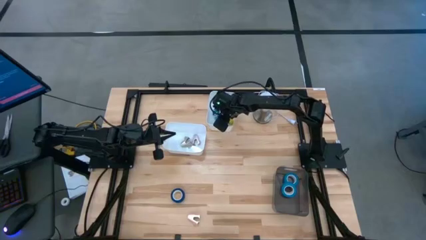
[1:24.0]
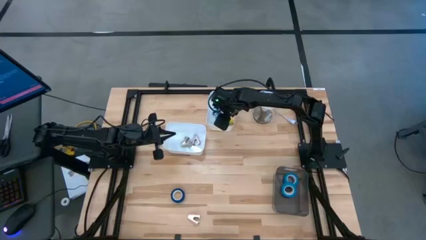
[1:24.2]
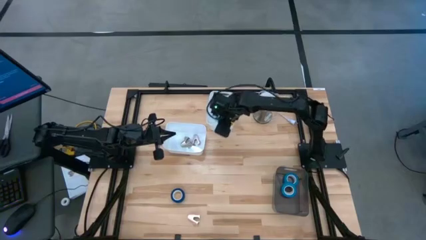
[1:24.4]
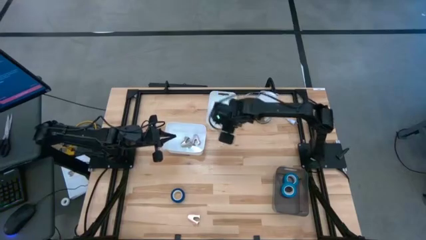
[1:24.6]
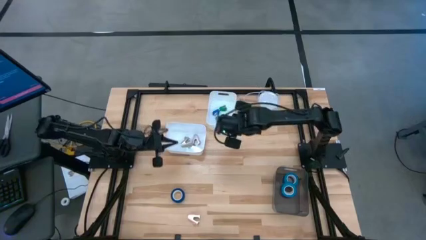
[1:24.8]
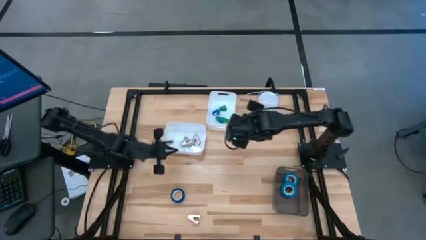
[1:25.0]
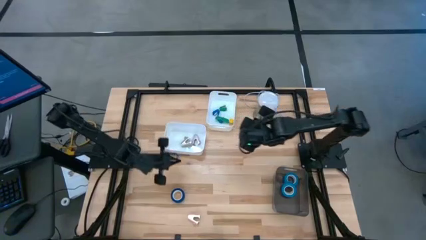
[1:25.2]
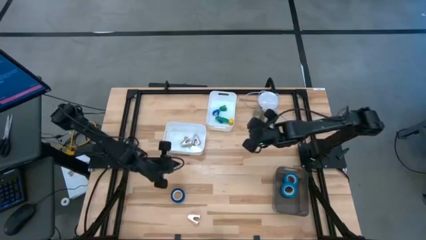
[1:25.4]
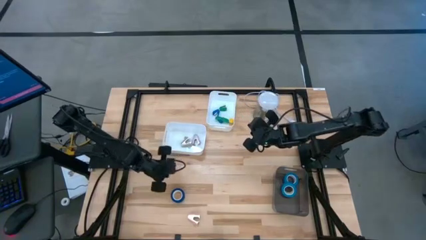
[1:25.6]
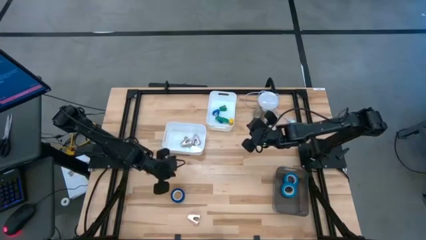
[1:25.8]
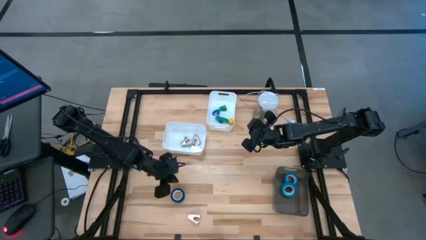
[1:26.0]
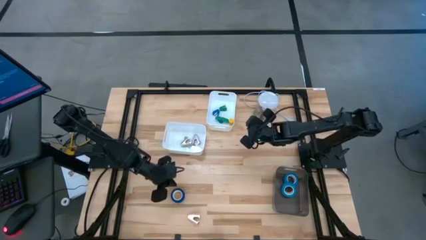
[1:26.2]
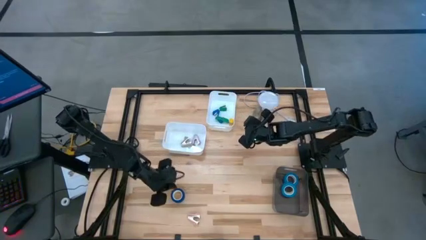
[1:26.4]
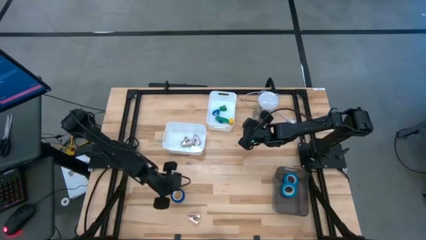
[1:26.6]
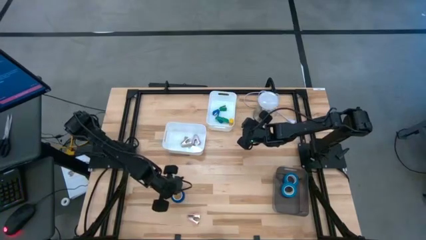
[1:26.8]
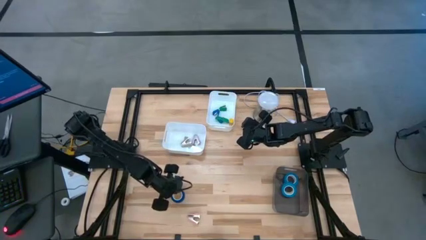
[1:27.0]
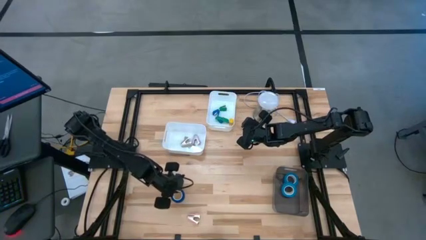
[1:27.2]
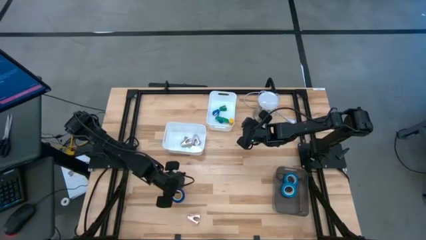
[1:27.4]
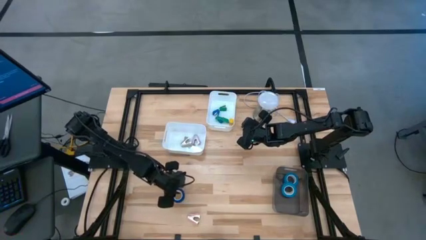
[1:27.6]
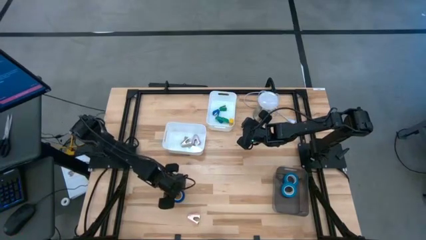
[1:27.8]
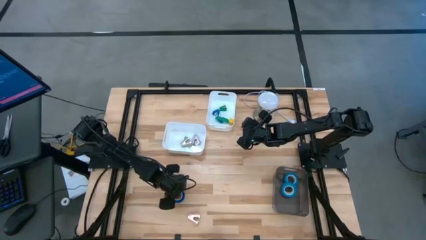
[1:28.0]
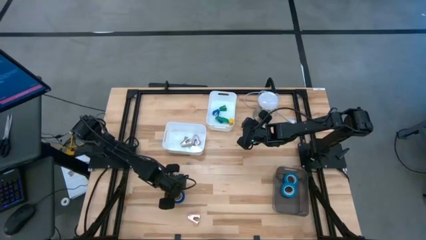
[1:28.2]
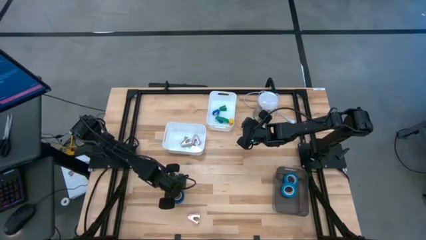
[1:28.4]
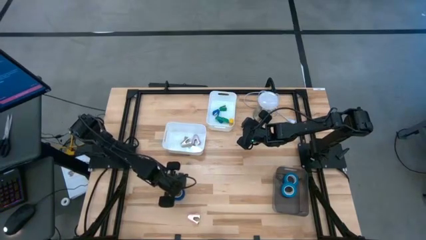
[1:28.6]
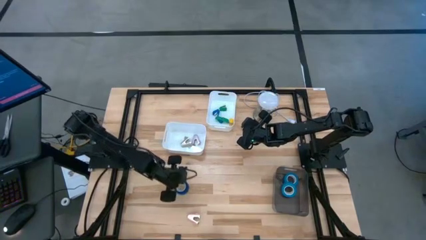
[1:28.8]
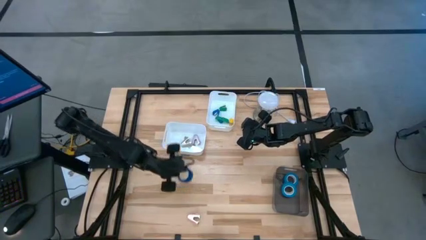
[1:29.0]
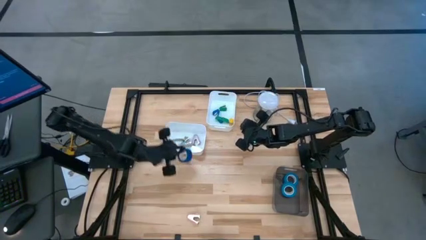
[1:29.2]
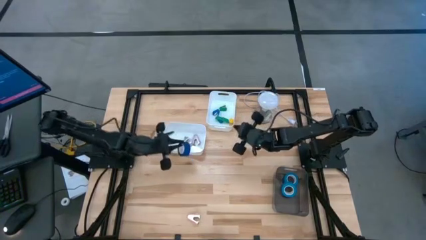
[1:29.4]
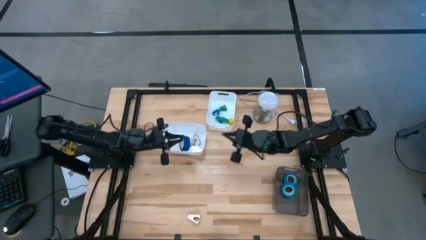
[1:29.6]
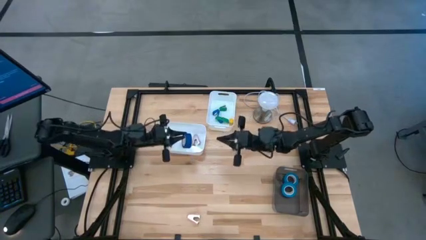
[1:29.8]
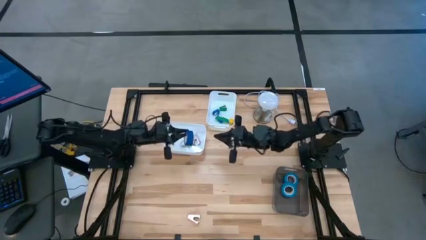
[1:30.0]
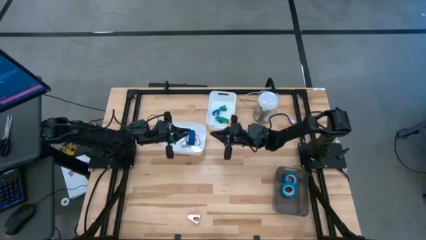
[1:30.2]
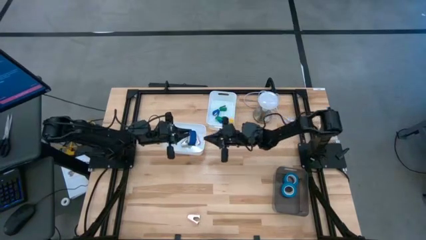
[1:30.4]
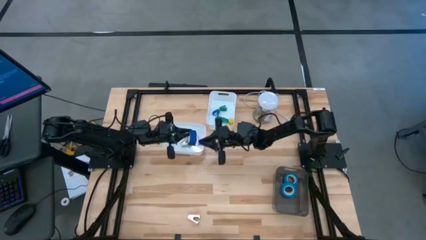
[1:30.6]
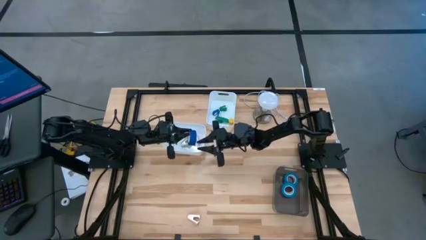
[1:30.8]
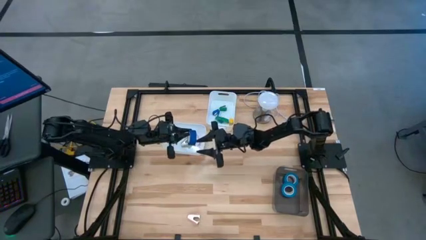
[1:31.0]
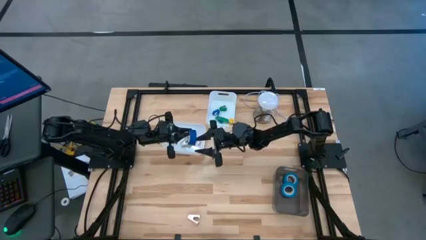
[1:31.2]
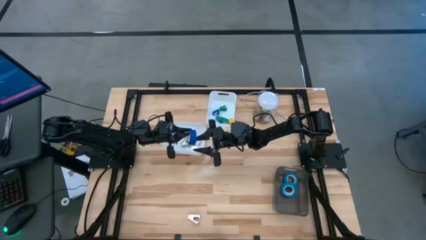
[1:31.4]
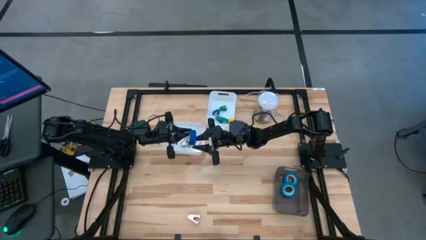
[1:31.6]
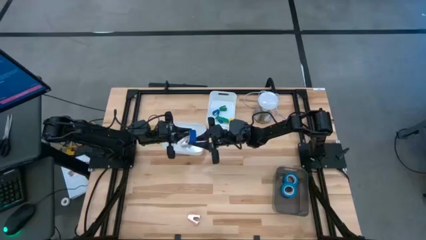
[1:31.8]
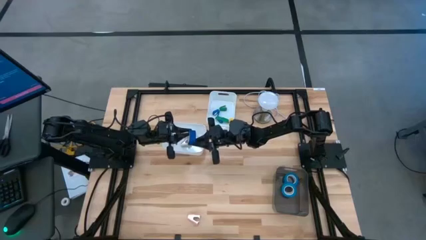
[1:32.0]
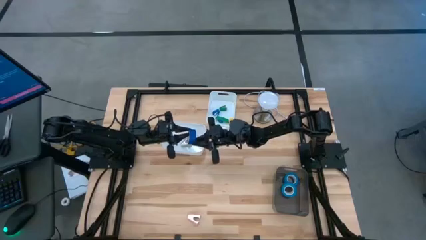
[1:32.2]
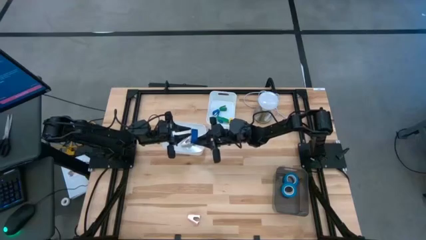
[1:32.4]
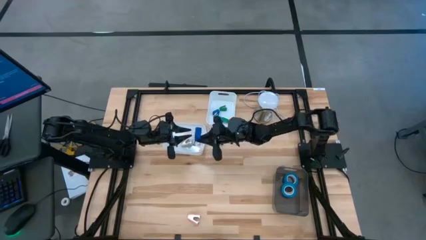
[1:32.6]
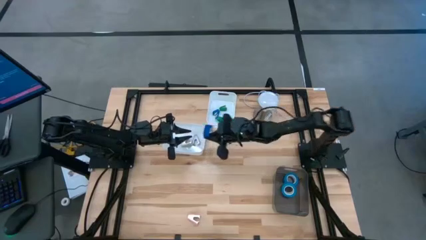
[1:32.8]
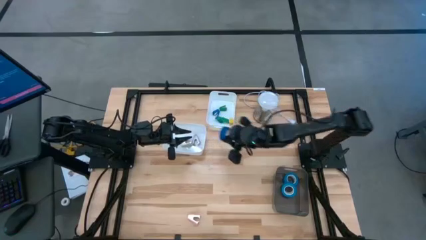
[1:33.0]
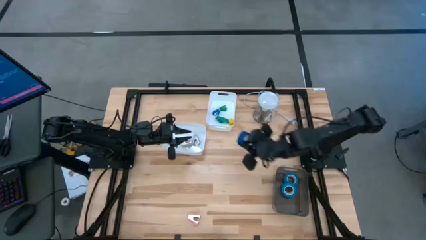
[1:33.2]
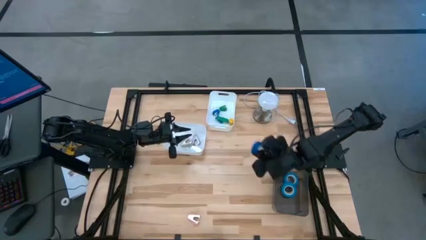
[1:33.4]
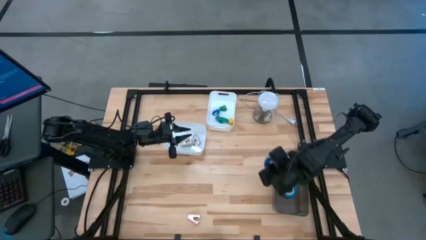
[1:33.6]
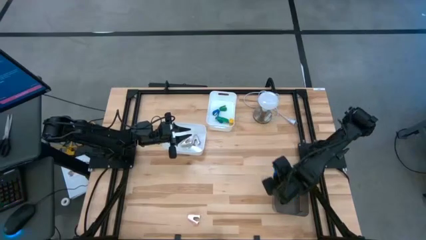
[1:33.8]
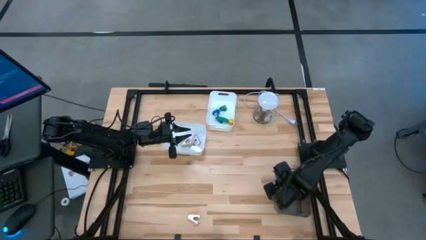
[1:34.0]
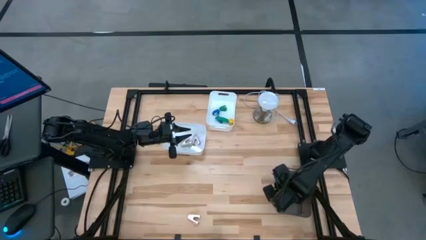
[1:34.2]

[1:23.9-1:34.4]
Task: Pick and place Stapler, Stapler remover, tape
Put the dark blue tape into the black transparent bin

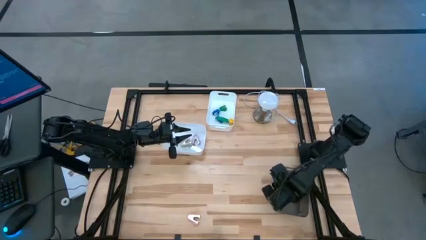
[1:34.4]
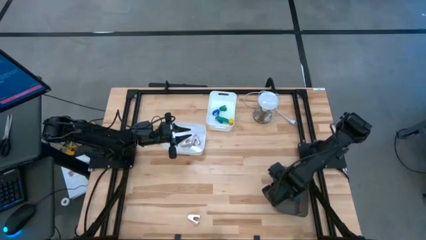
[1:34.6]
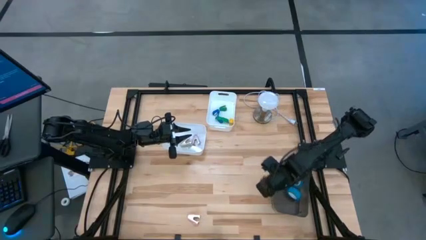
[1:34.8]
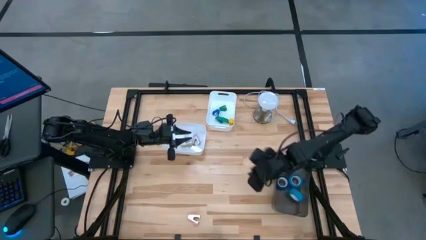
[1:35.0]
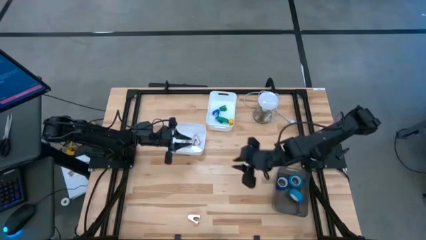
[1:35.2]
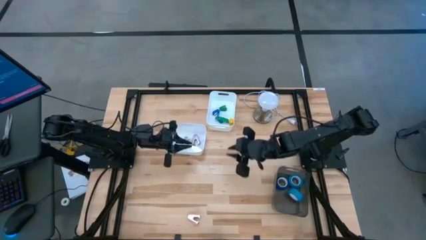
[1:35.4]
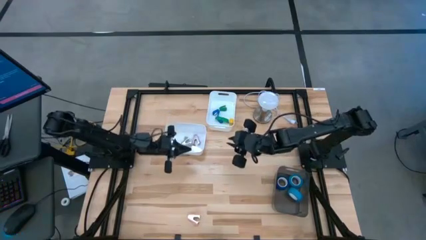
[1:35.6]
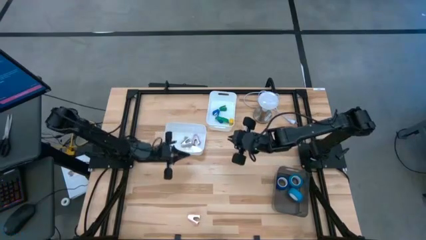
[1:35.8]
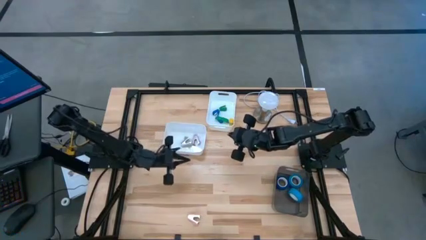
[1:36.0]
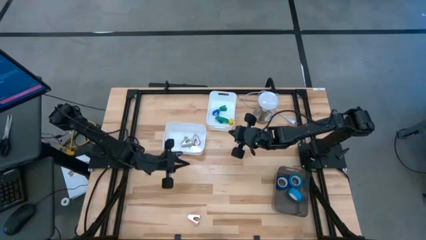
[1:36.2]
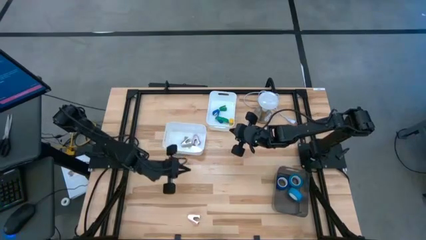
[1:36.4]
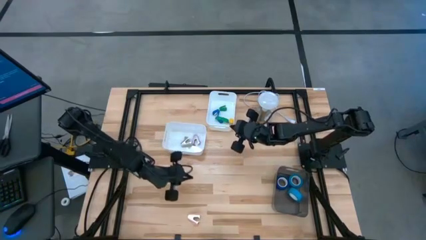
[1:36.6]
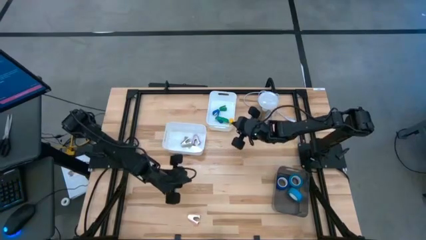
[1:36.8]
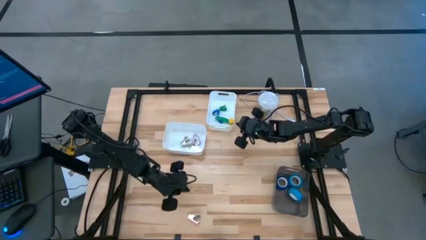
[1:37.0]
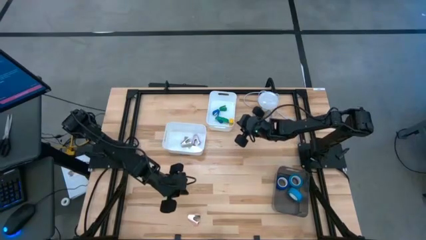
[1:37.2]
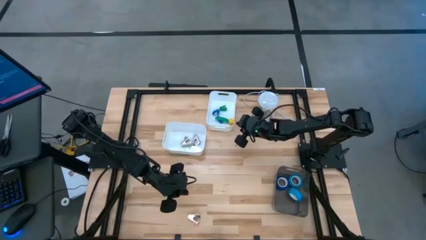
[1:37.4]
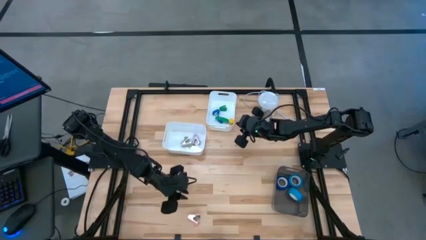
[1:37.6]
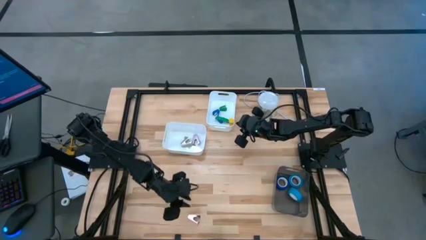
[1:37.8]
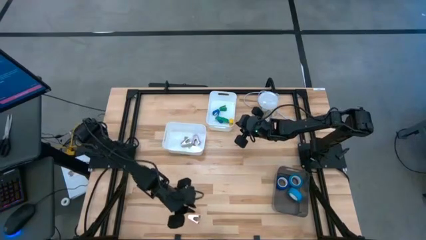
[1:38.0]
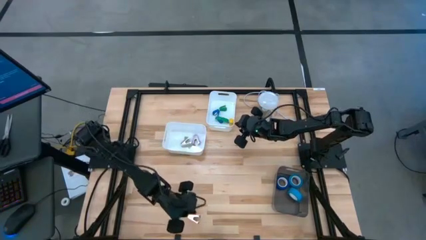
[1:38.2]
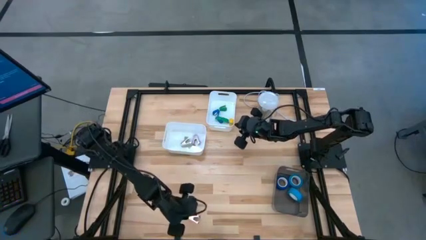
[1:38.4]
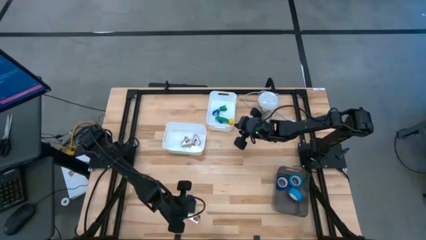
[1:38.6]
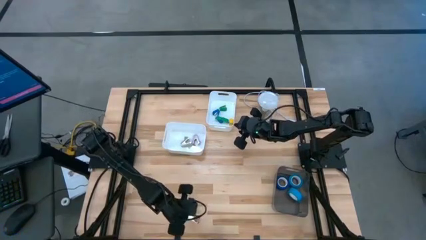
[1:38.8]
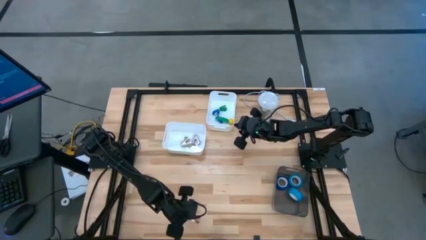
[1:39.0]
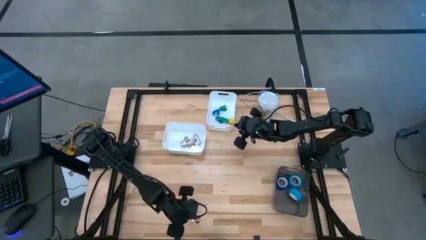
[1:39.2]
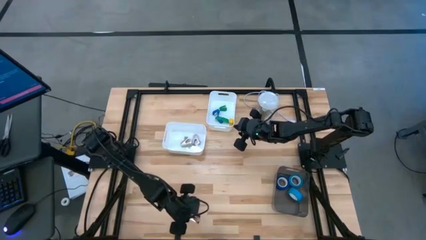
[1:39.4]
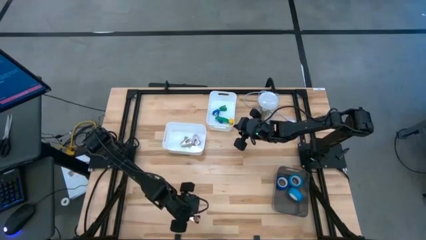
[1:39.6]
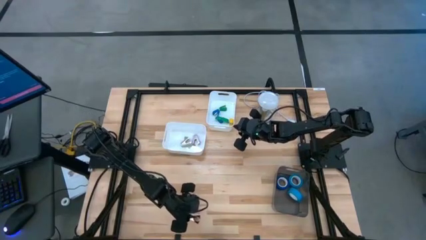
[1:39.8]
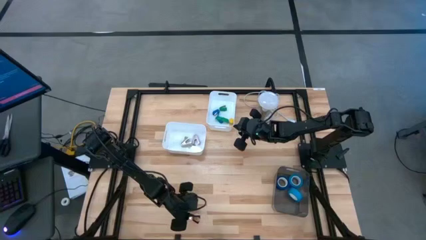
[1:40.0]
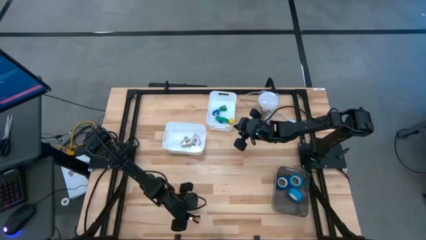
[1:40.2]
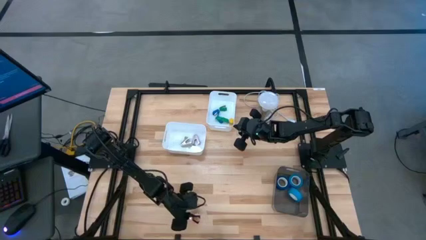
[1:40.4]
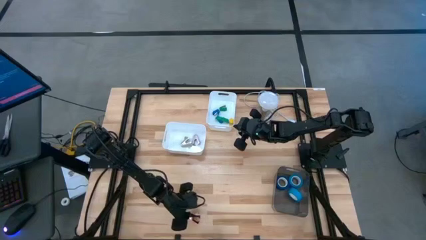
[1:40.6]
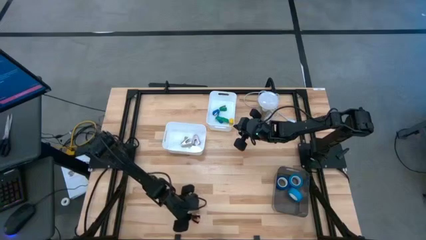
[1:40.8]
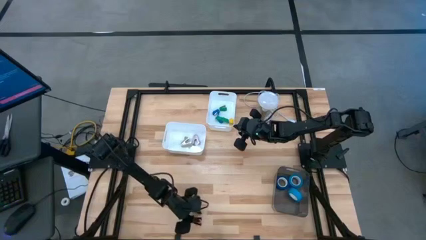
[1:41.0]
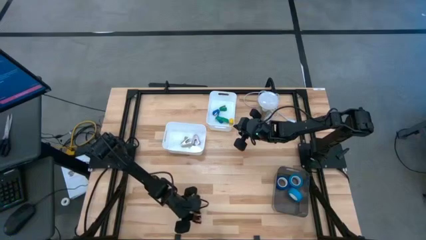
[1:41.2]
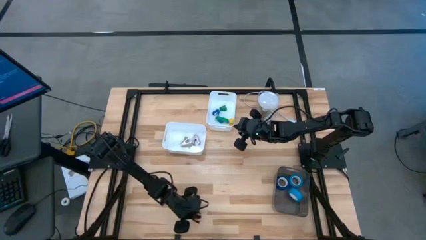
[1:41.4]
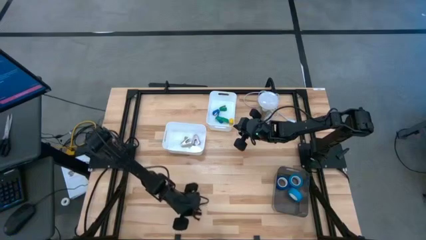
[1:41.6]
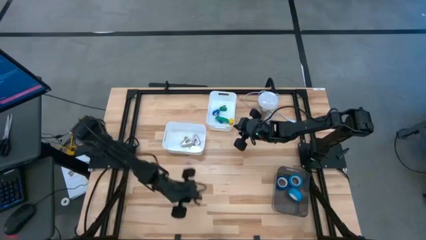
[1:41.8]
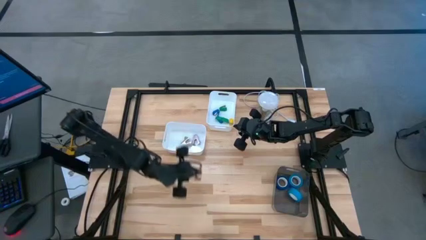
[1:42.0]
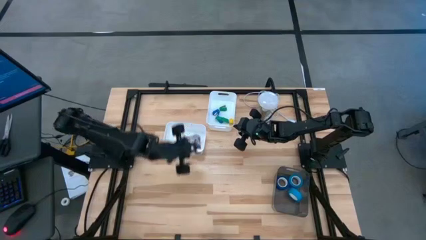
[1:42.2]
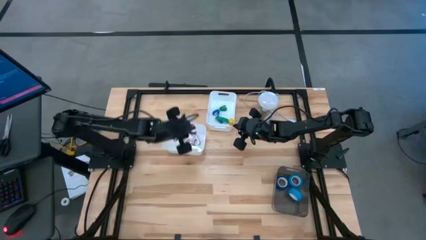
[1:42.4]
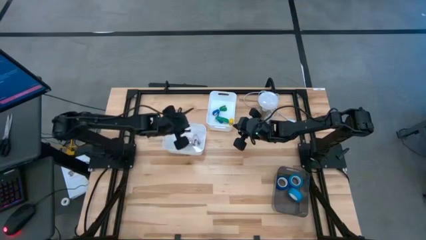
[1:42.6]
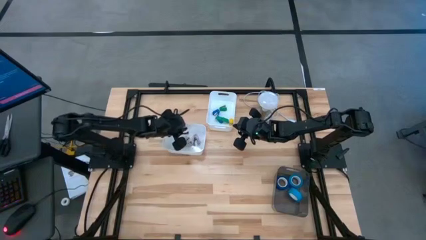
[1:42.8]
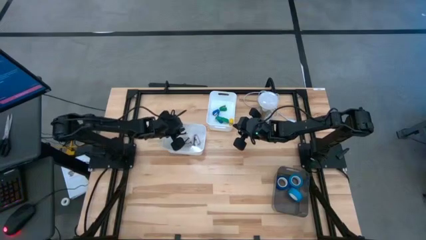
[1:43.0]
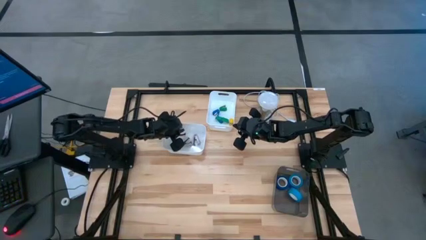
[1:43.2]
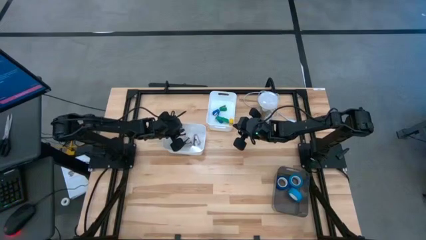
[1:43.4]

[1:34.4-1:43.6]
Put the pink staple remover into the bottom white bin
